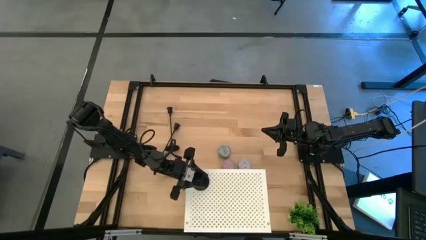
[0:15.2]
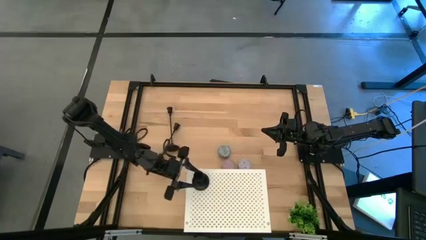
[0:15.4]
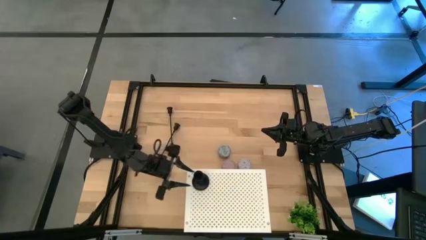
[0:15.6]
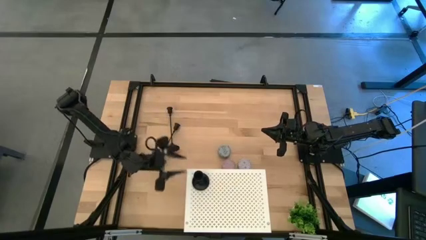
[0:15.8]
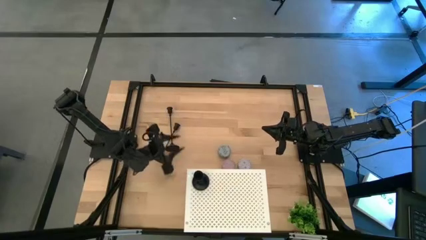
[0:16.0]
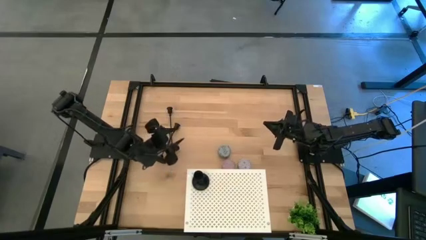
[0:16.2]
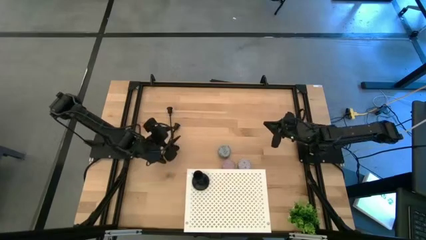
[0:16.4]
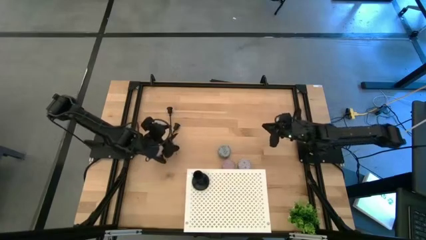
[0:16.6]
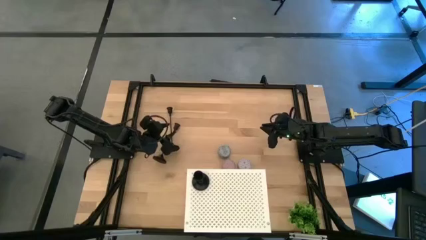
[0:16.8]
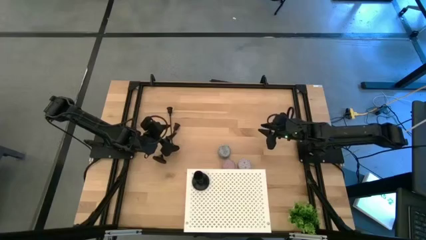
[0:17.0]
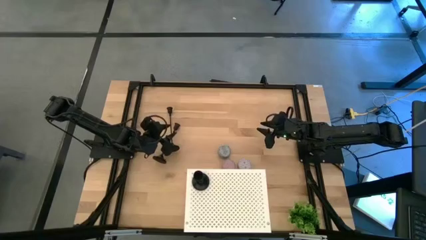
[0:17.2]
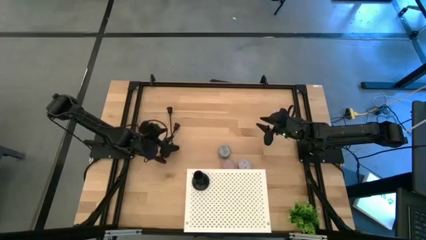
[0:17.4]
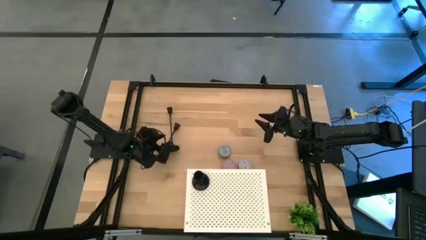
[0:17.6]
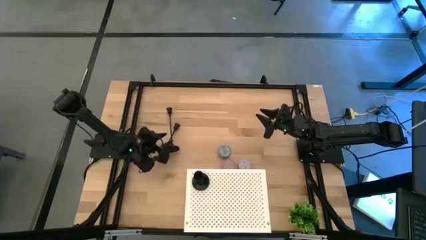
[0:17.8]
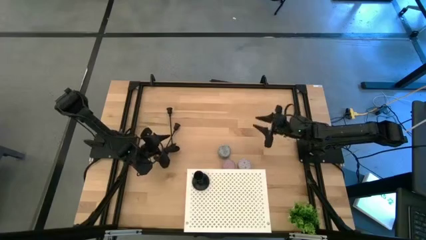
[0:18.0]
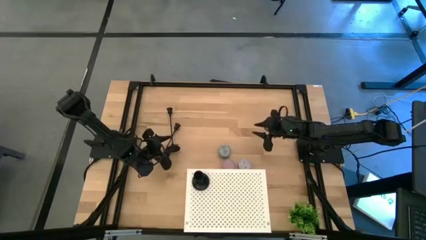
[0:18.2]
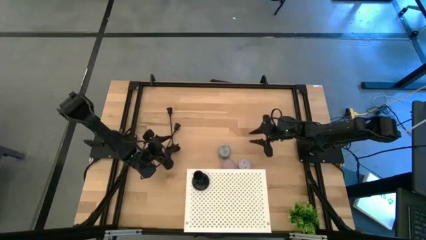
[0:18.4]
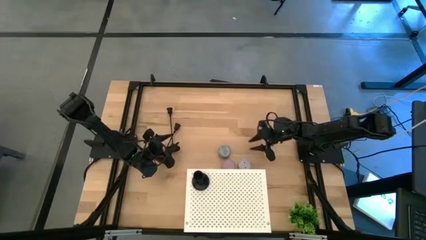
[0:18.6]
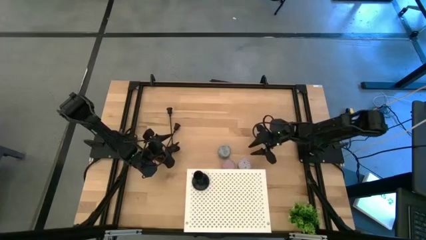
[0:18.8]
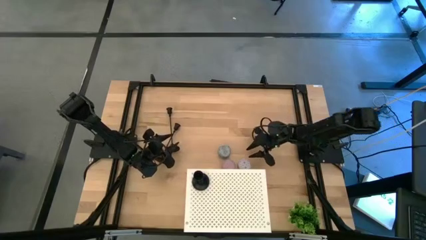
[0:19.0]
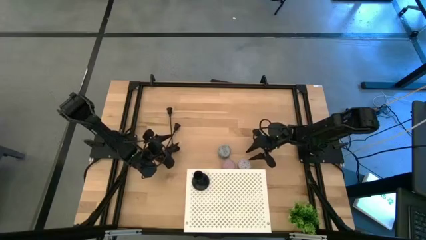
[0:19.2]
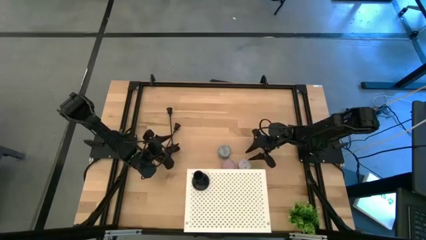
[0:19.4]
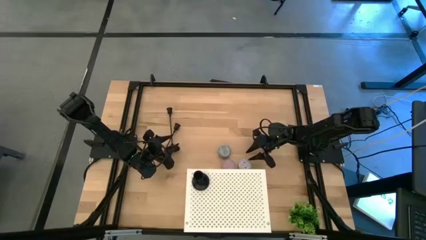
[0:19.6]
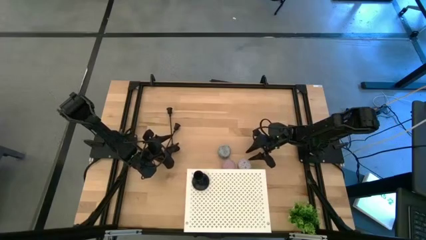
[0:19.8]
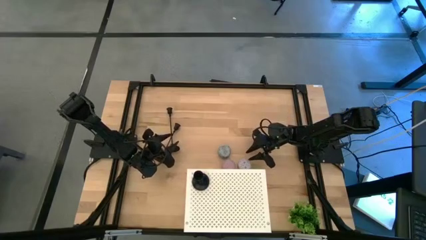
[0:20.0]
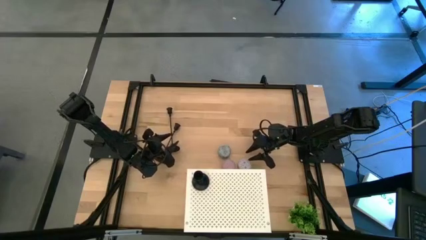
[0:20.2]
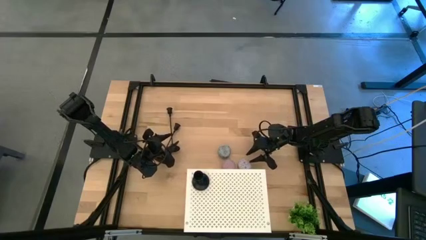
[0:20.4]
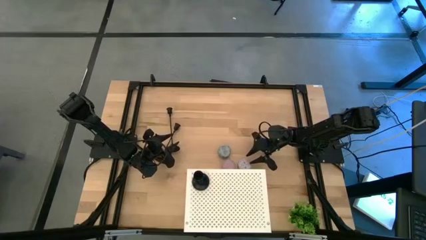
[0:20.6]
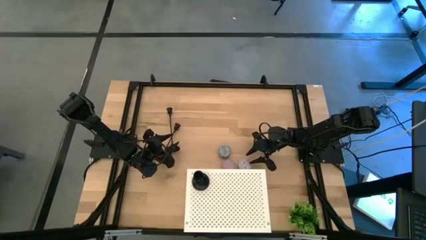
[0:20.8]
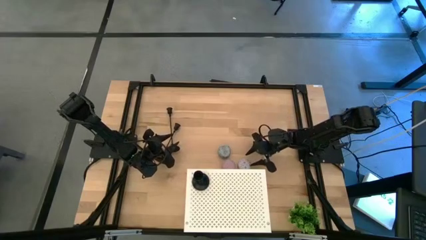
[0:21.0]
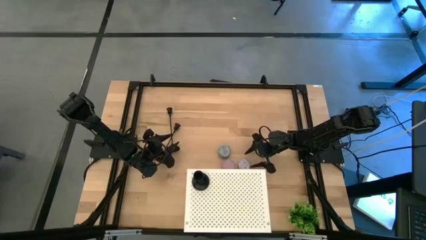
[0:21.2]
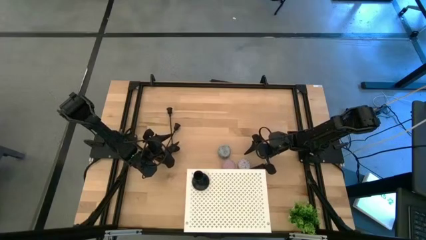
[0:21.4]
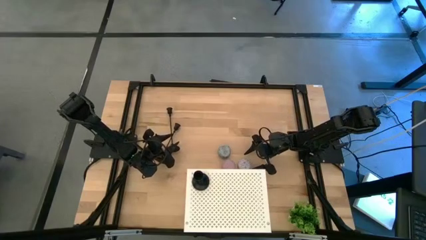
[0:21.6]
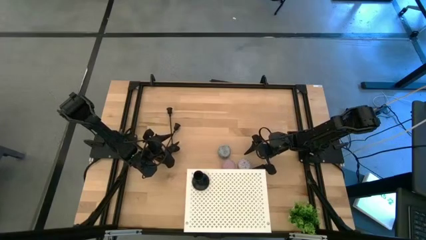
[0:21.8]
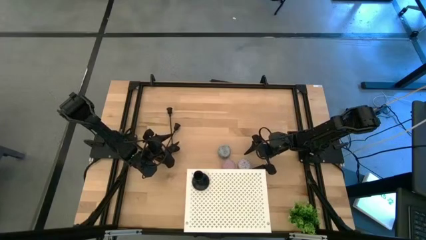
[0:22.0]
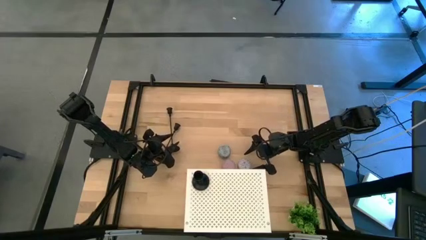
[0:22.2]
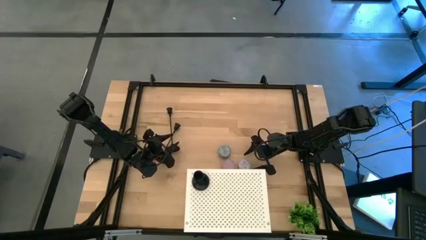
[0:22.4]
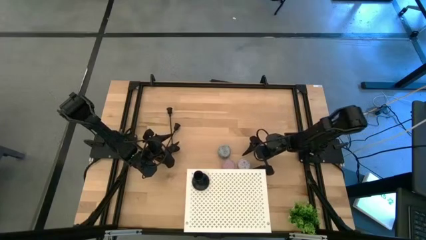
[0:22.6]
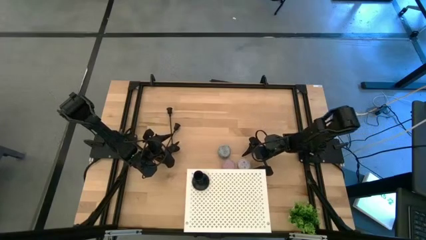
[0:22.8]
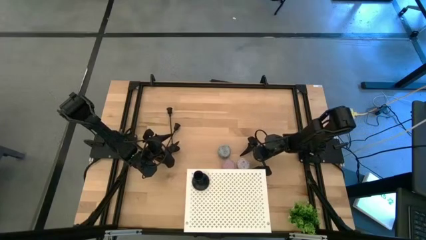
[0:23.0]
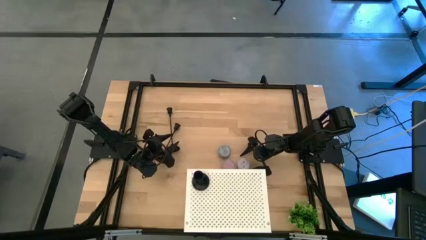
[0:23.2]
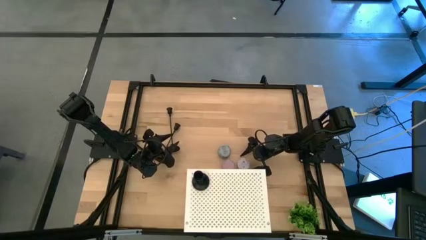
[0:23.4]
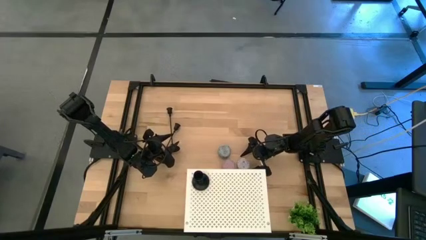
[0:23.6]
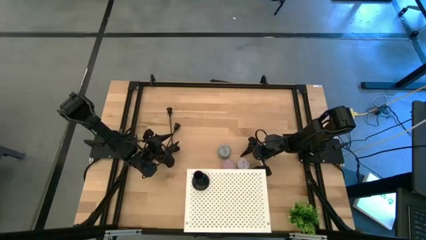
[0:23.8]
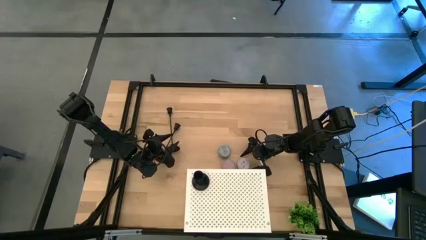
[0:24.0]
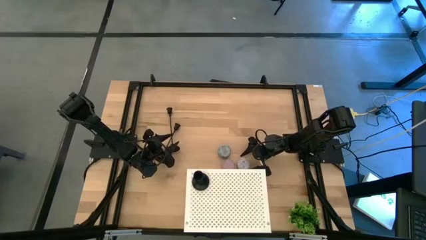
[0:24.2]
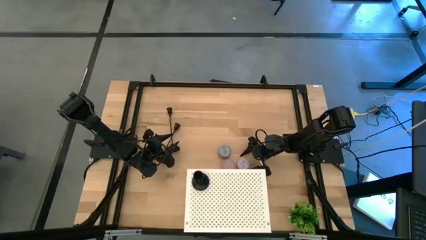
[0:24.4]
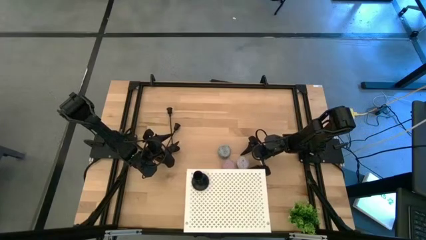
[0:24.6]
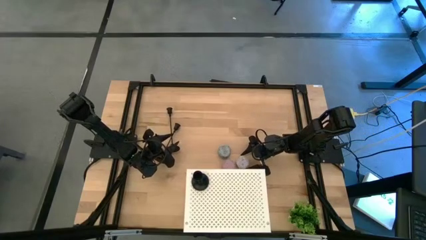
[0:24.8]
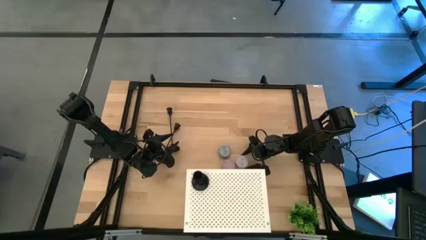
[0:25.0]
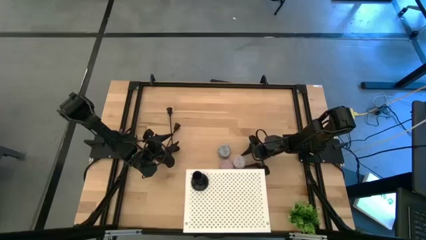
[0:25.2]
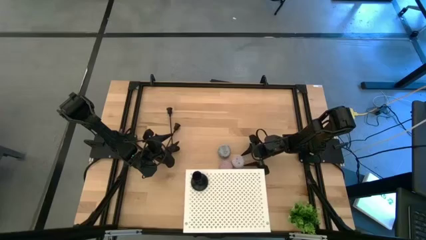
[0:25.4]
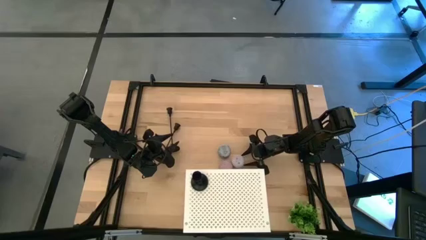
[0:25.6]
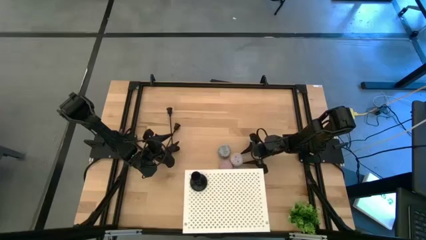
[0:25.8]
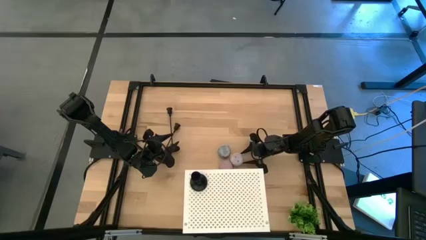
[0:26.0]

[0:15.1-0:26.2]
Task: Pick & Place candle stick holders
Put the right scented candle on the shelf
